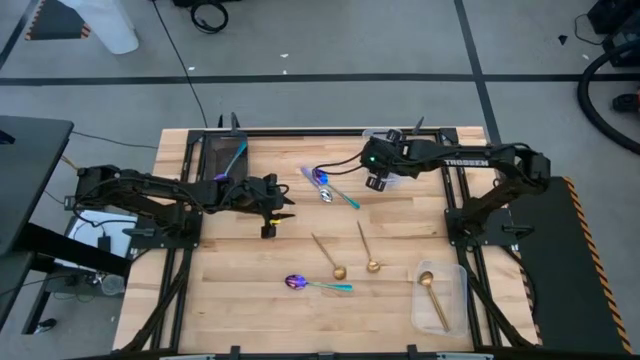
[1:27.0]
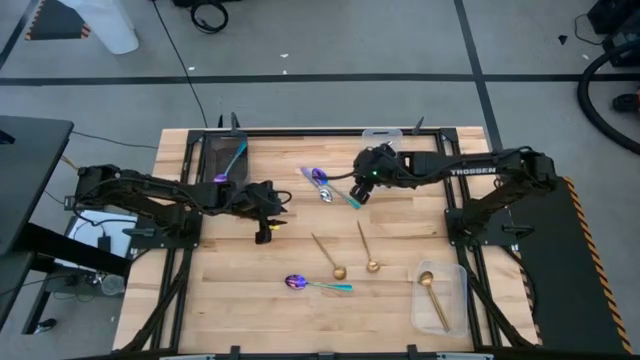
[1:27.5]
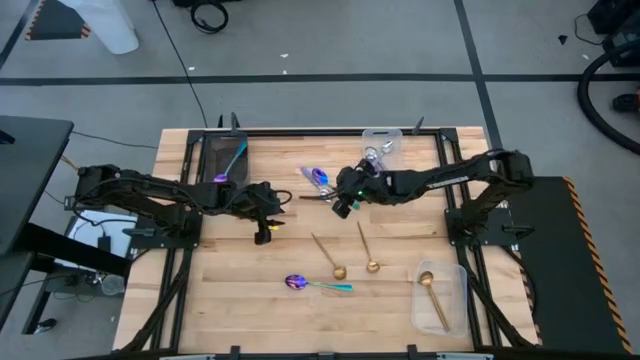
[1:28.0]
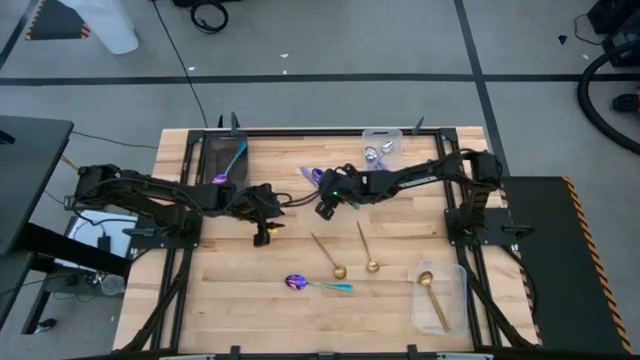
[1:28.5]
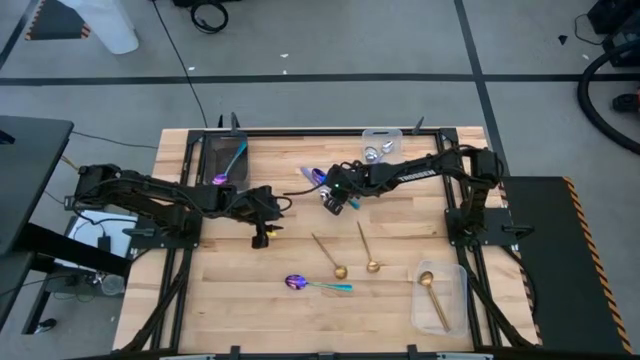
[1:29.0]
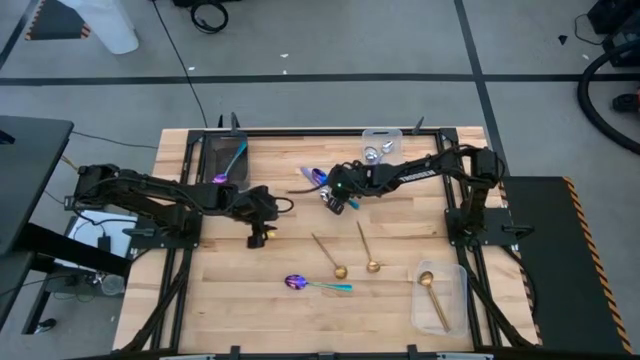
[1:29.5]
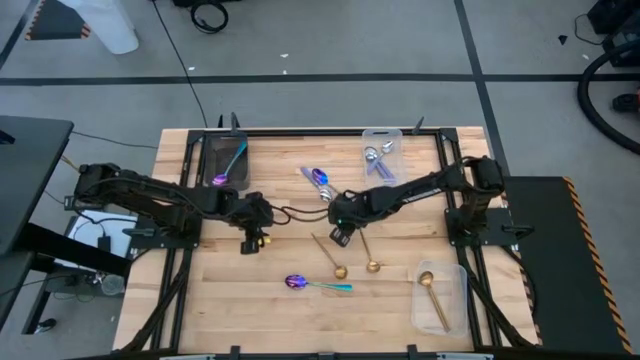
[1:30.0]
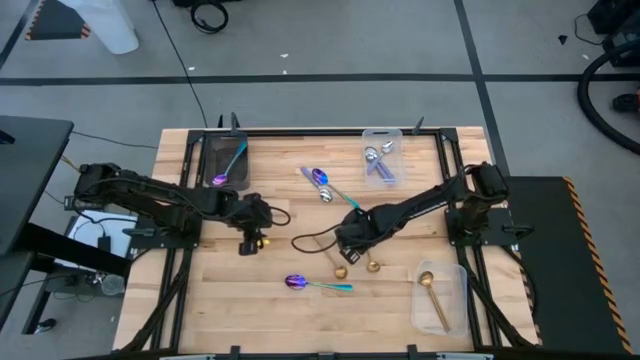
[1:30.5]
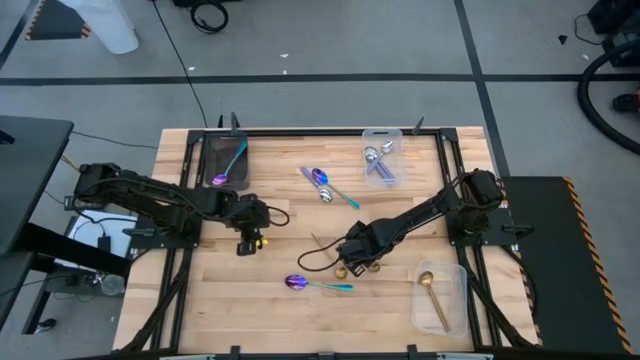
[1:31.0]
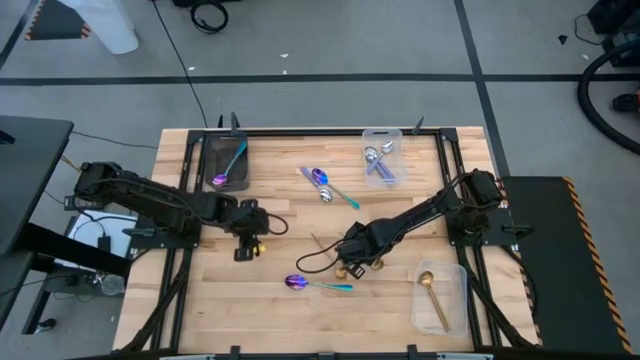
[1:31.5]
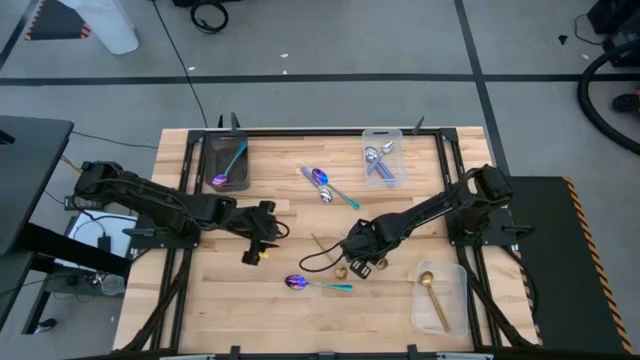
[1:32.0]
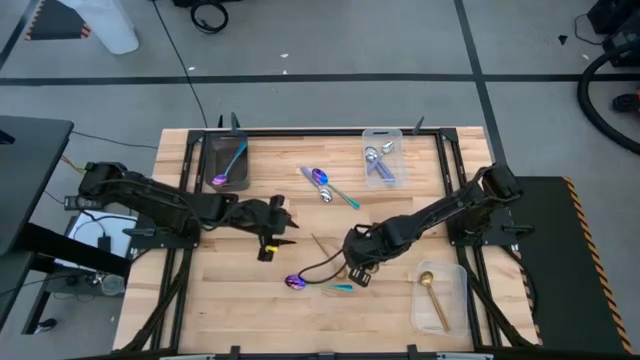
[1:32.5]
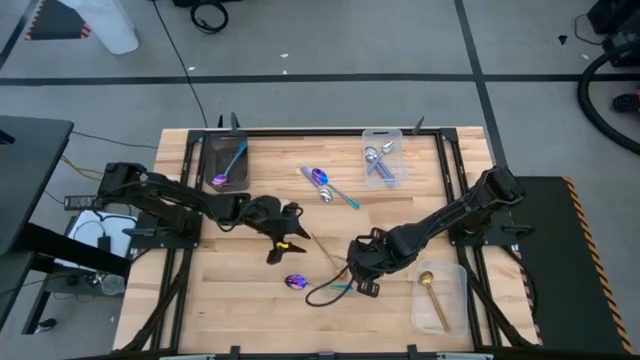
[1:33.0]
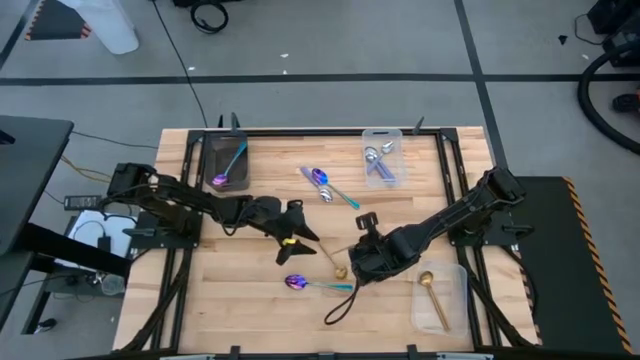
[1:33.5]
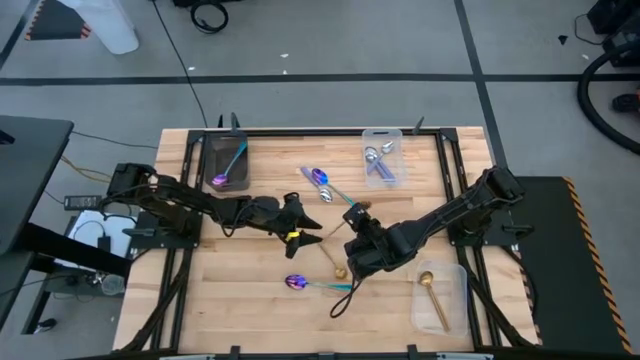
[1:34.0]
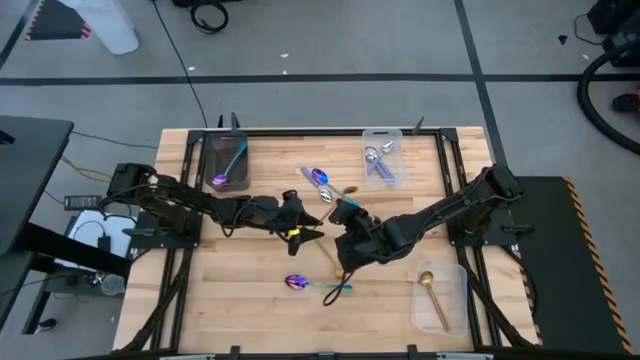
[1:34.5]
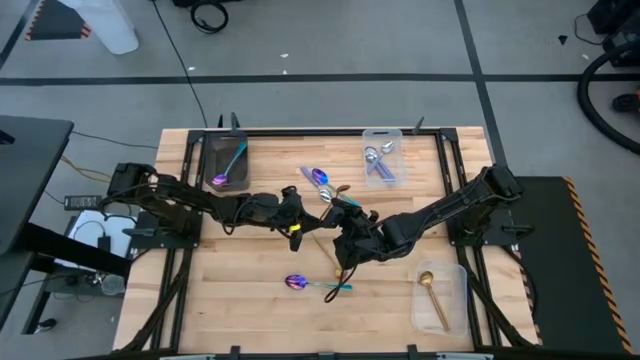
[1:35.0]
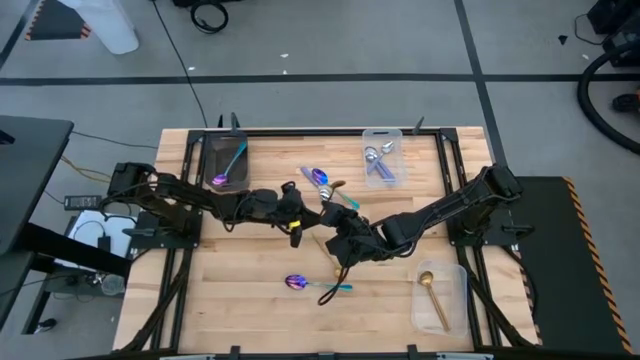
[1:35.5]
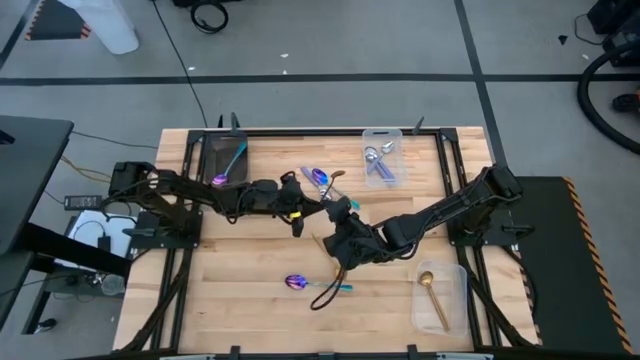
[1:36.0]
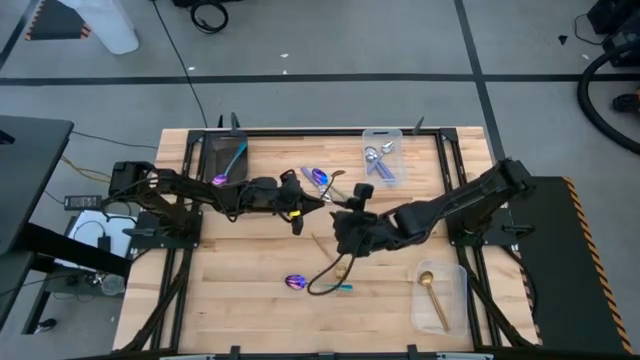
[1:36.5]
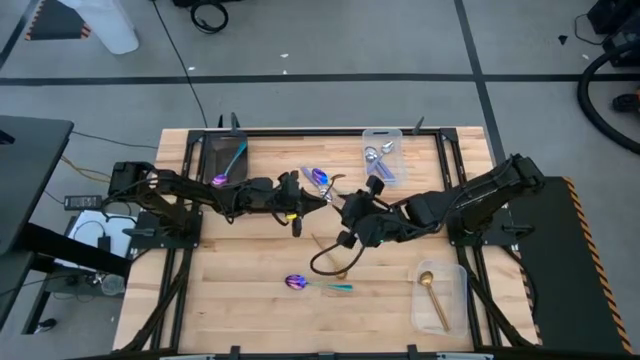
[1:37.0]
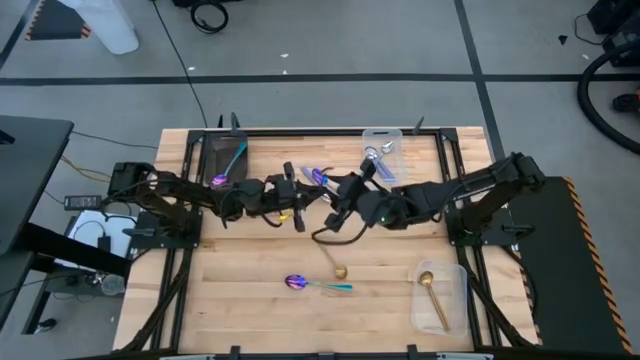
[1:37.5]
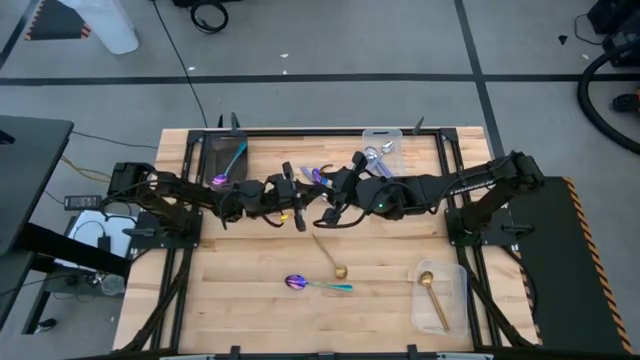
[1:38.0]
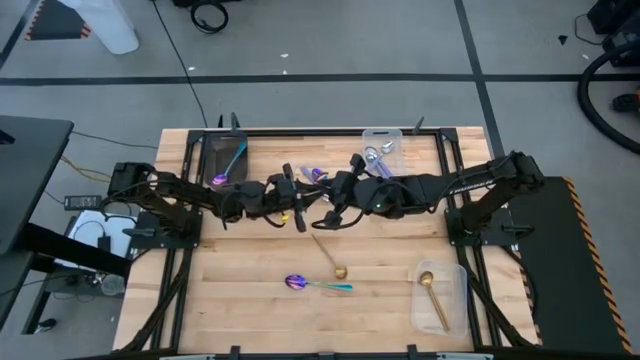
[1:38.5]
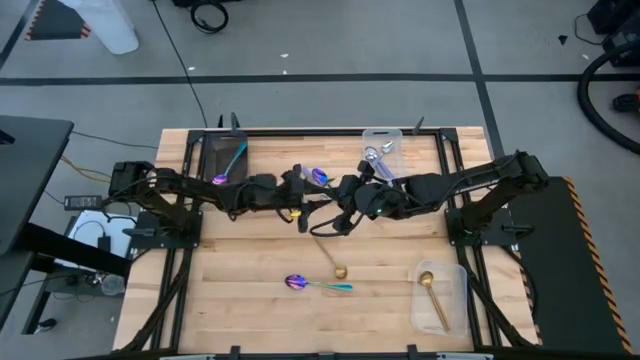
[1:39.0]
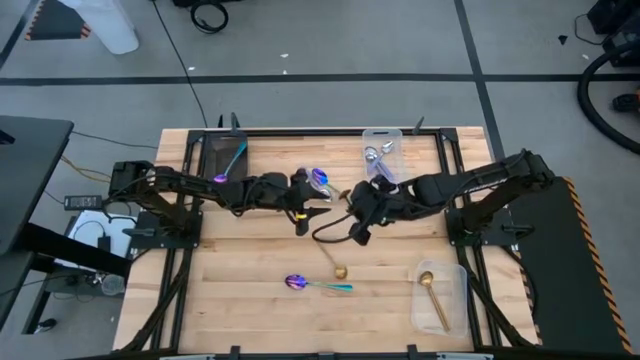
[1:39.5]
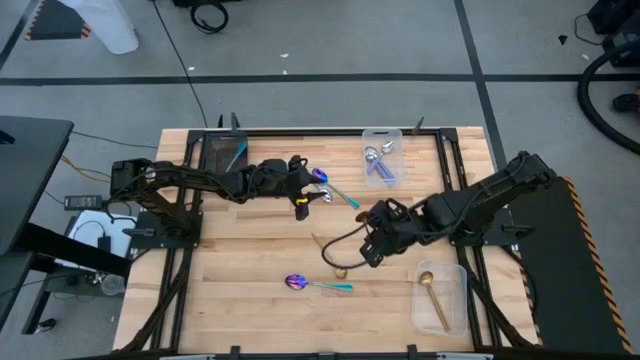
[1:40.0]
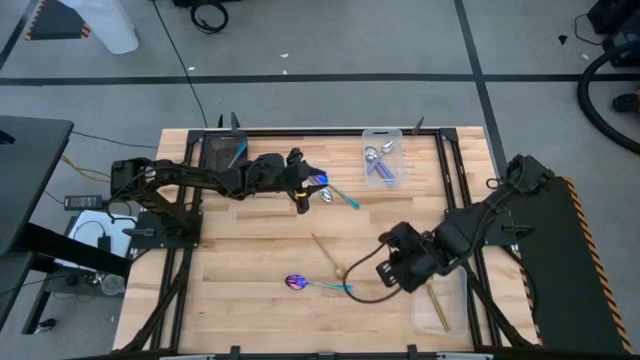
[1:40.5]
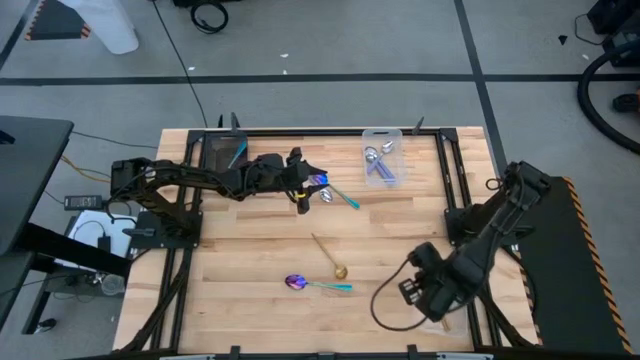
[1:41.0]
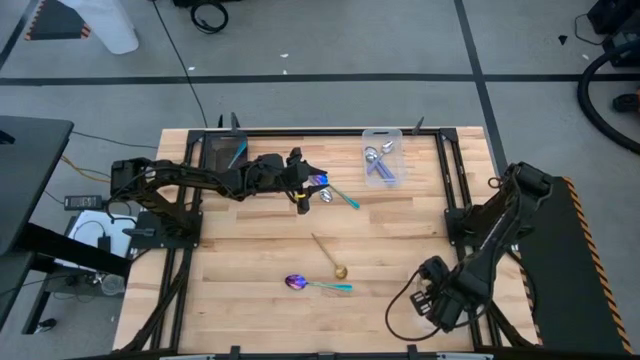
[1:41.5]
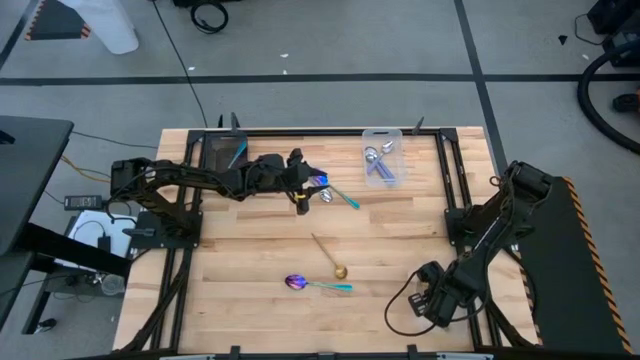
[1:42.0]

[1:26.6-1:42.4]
Task: Sort silverware by color (type)
Put the gold spoon into the bottom transparent bin

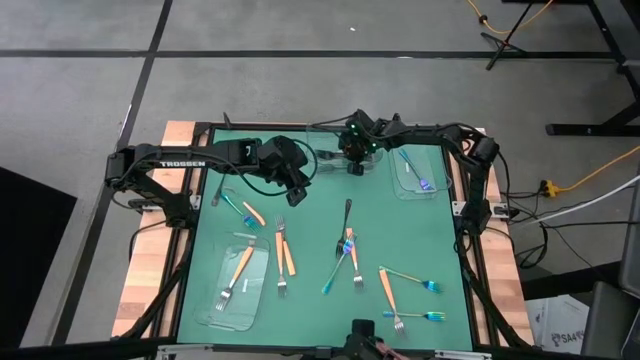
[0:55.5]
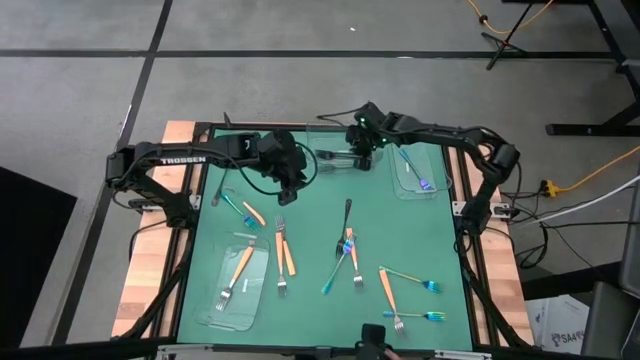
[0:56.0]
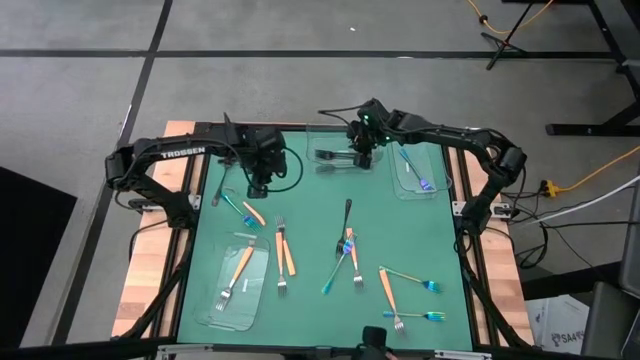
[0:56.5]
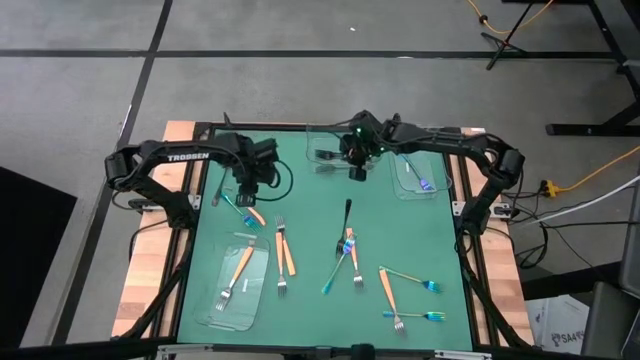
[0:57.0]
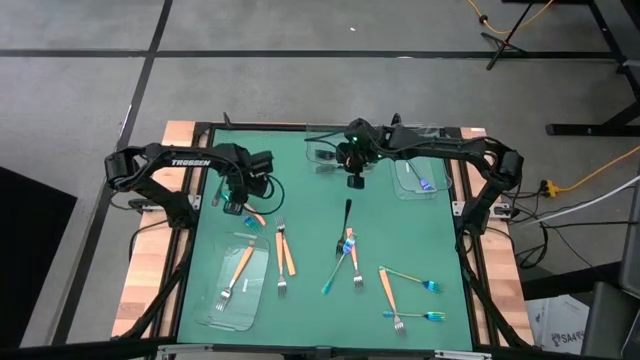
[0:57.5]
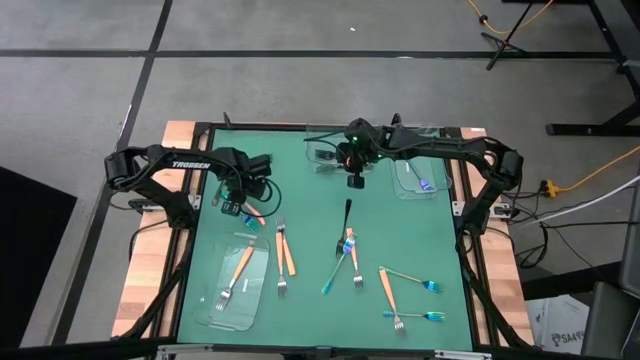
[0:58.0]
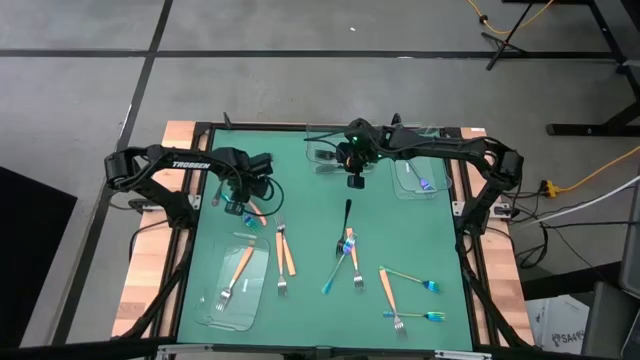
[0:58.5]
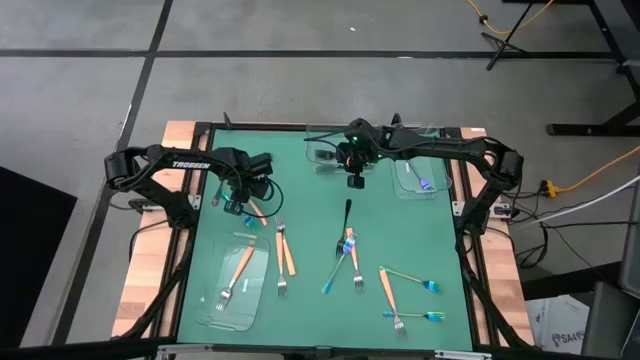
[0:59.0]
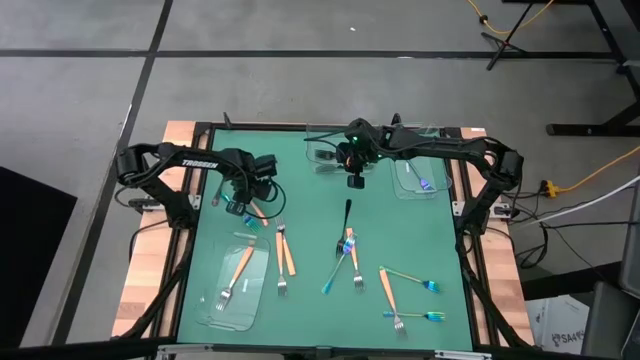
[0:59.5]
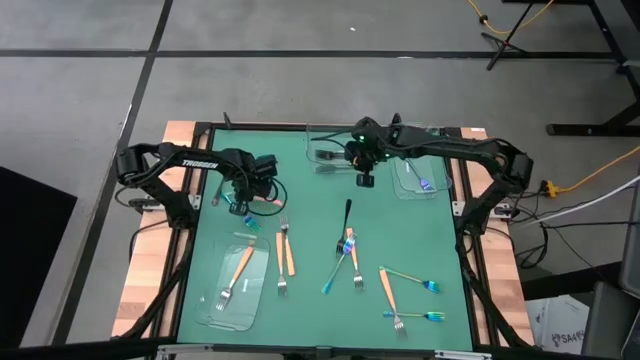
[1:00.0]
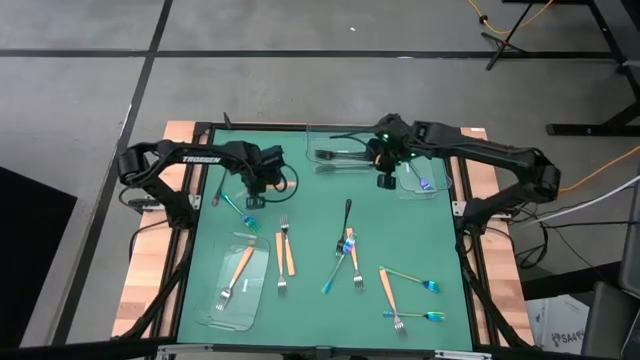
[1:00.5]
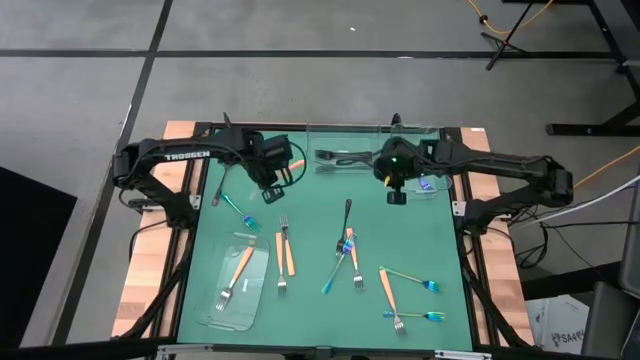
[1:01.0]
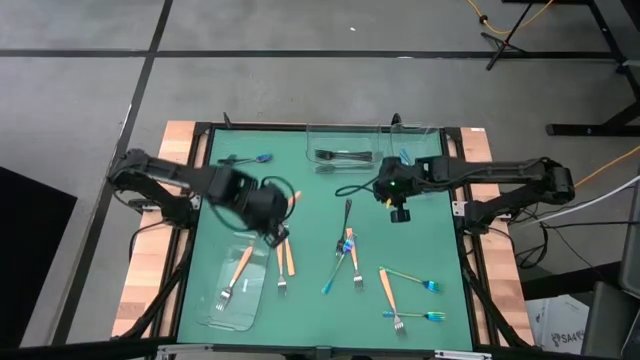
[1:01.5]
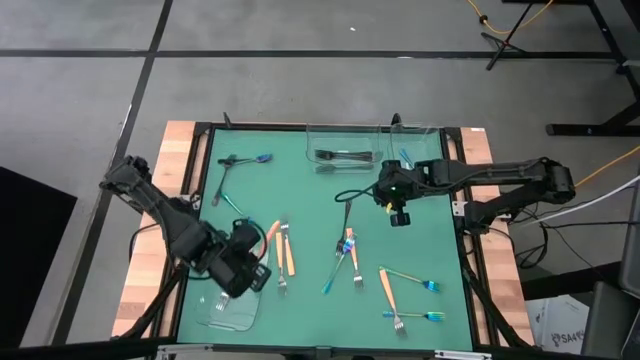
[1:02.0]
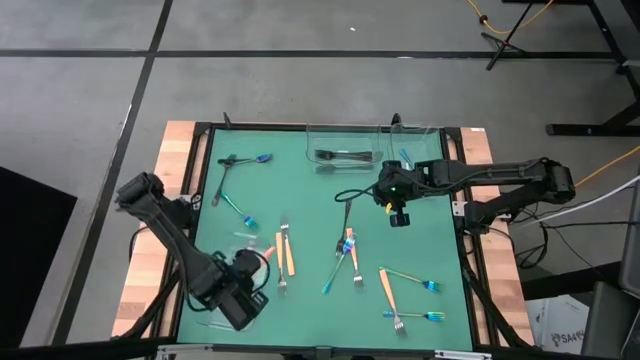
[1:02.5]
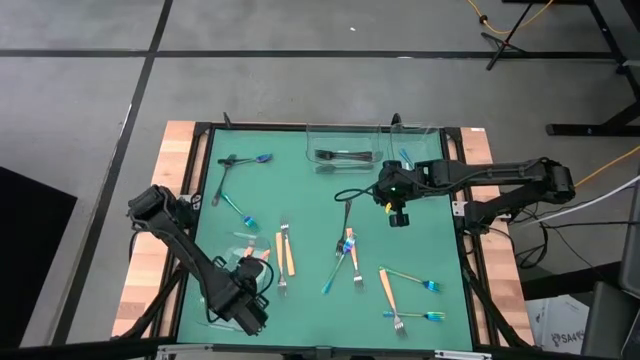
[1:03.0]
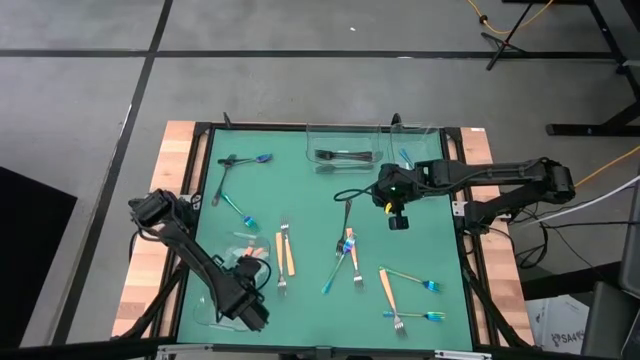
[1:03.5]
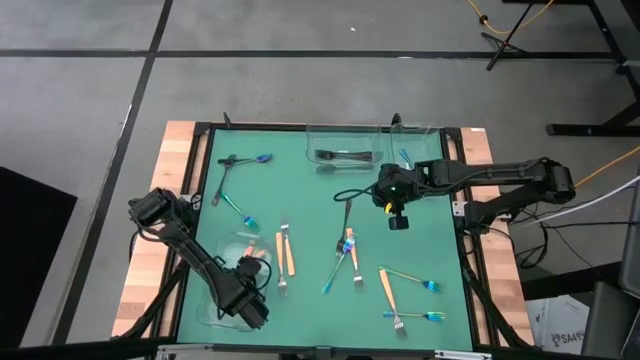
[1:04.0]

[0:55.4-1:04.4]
Task: Sort silverware by color (type)
Put the orange fork into the bottom transparent bin
